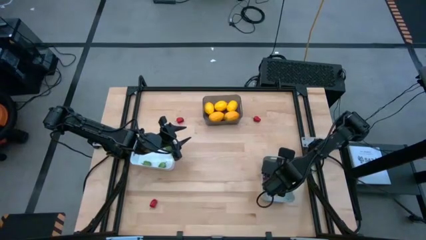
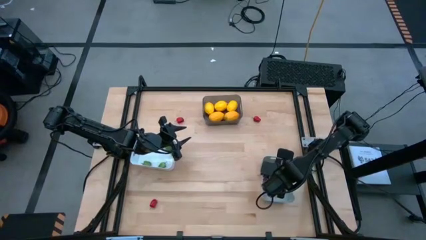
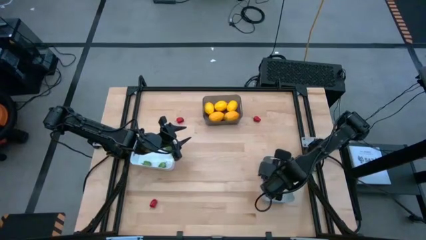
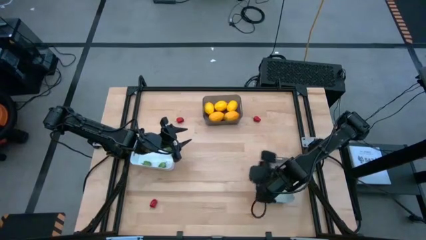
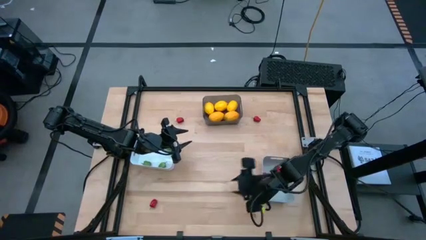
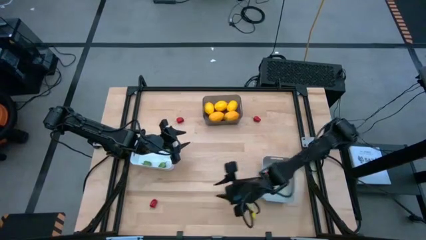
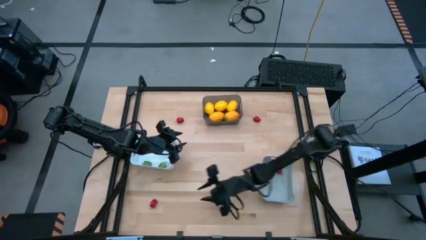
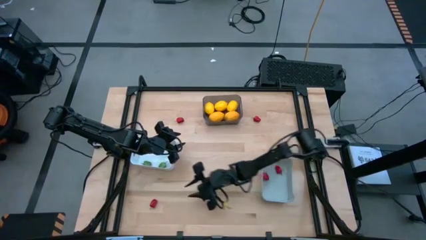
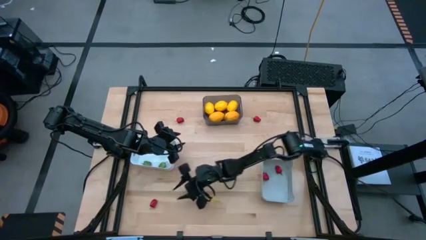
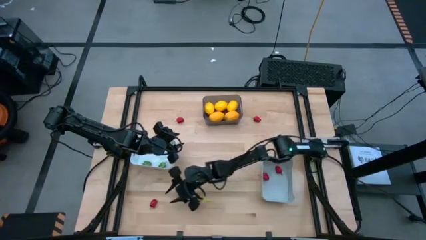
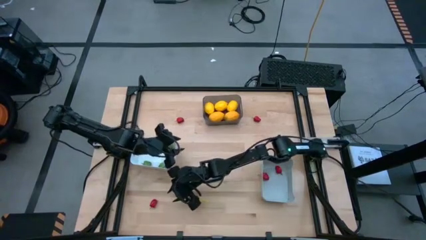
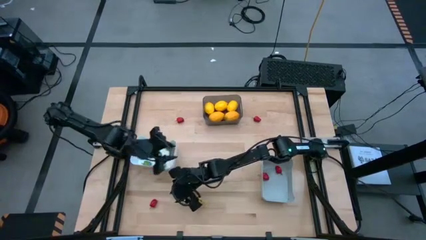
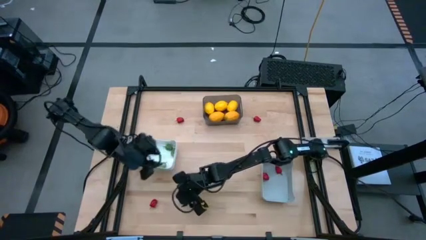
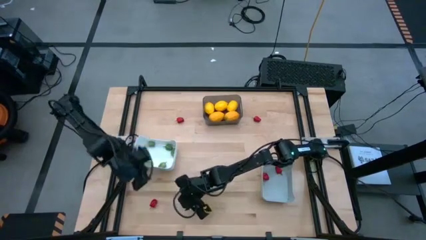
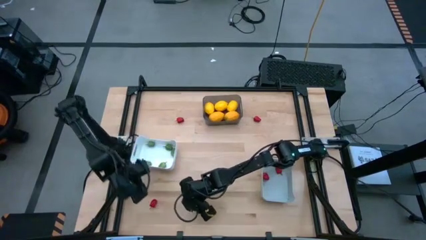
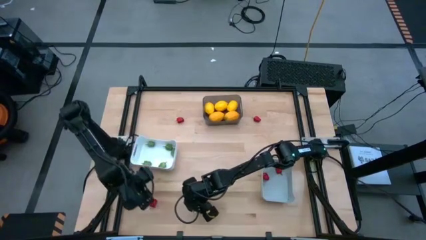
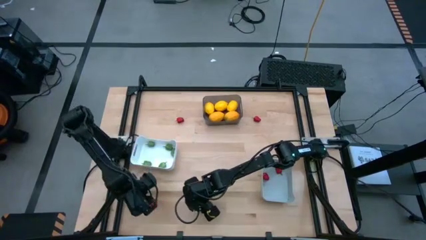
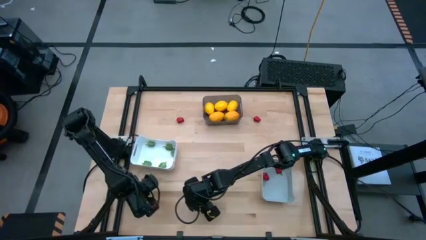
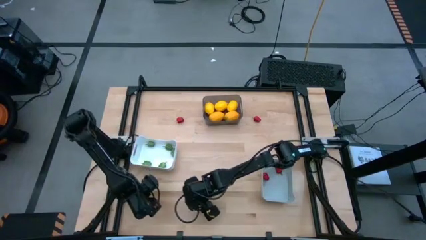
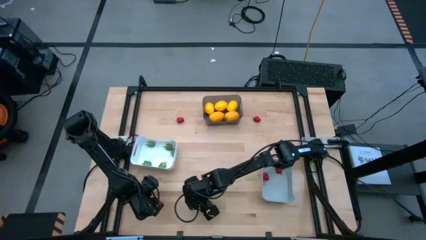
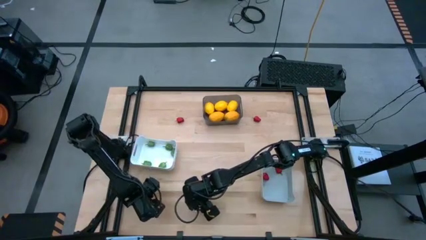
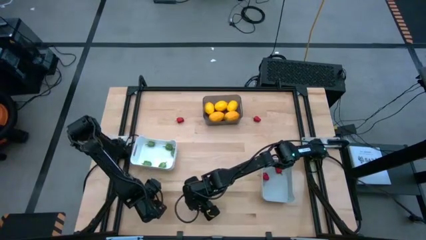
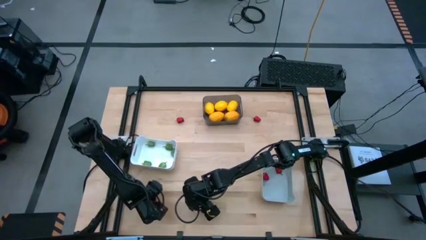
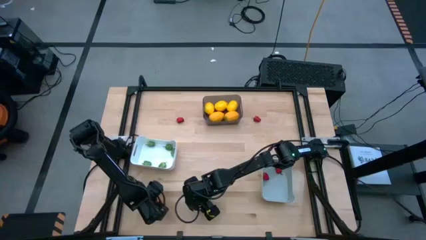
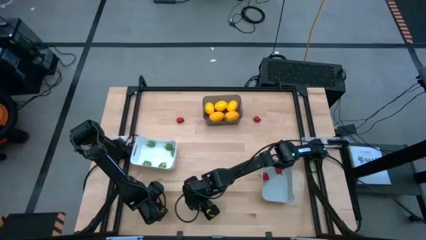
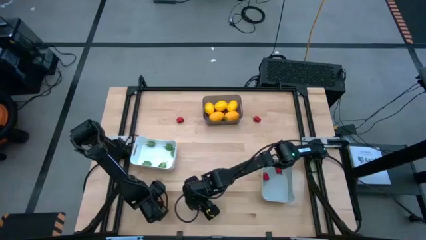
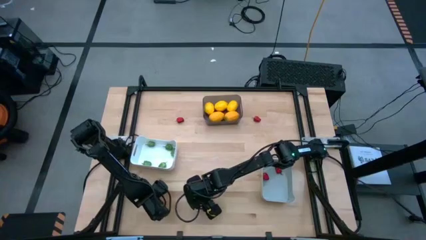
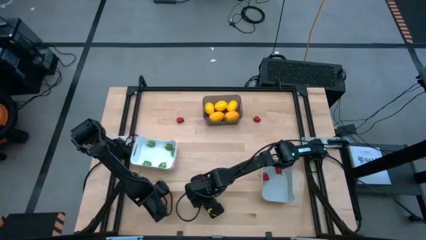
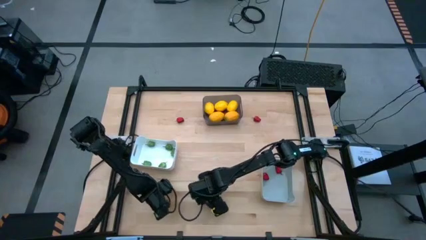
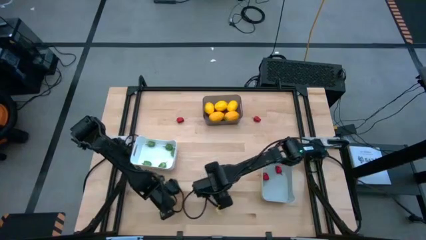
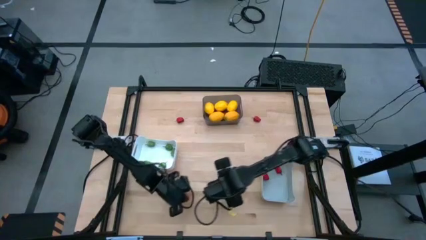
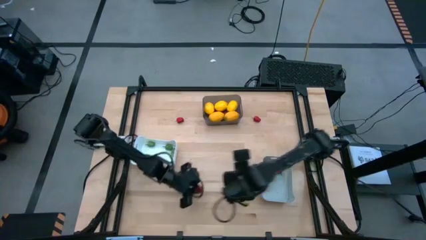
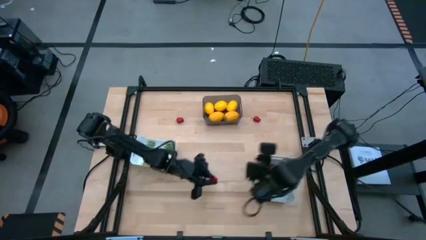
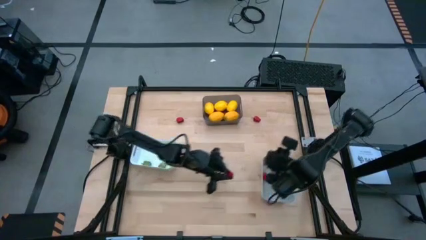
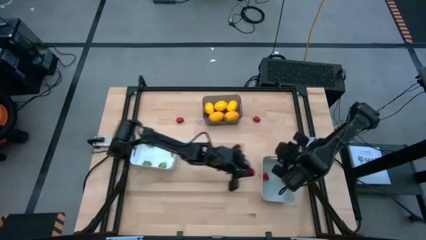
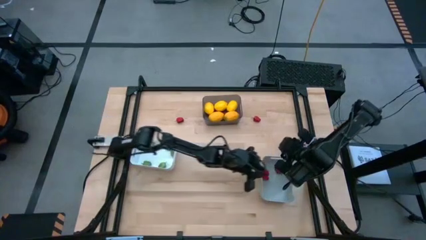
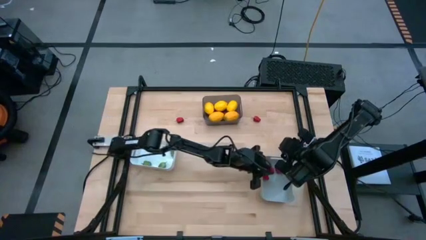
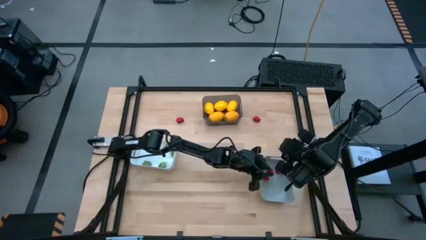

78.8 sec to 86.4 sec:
Task: Sort produce into baskets
Put the red bell pepper into the gray bin

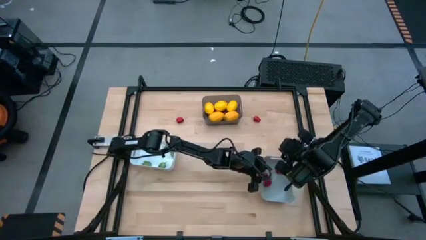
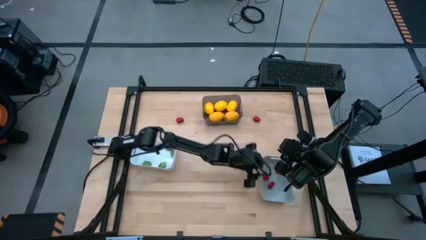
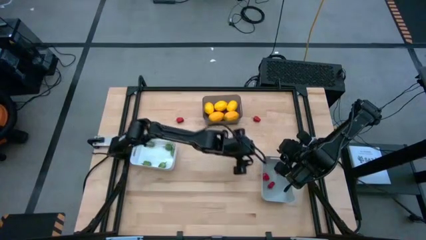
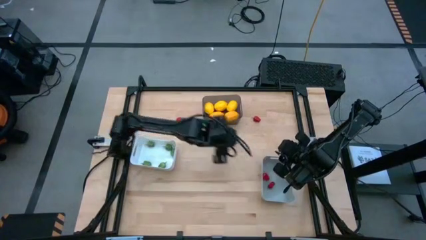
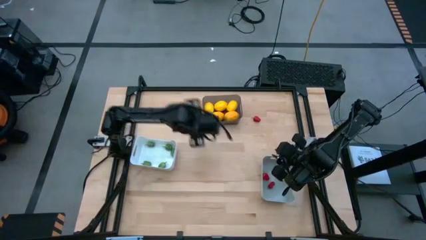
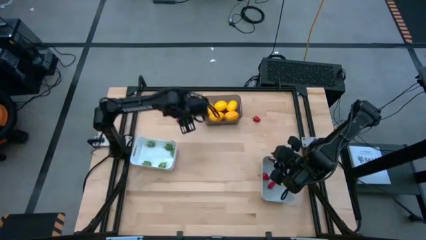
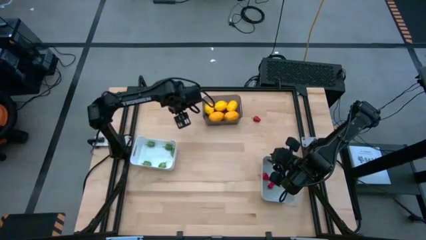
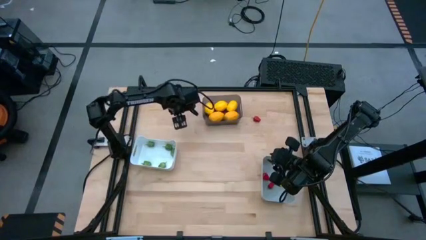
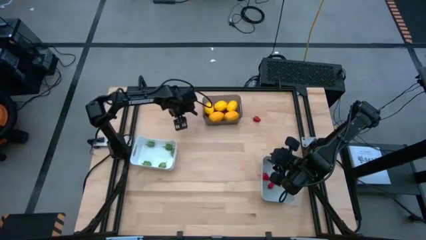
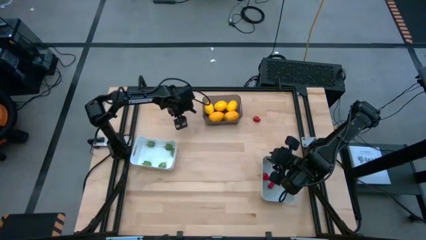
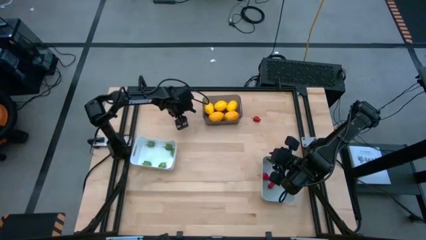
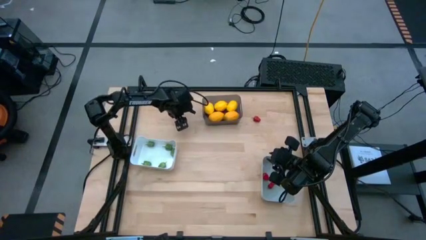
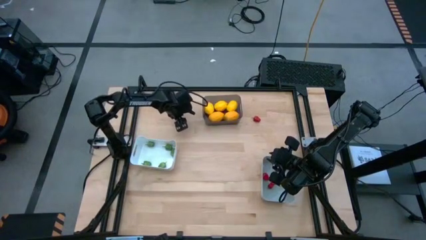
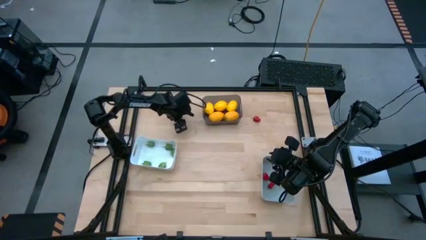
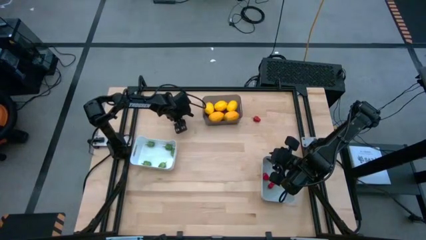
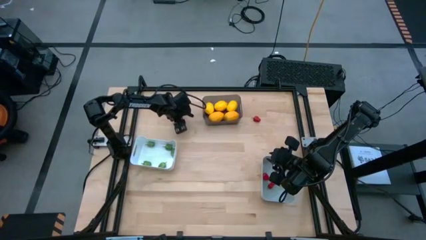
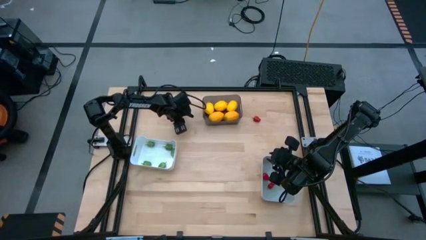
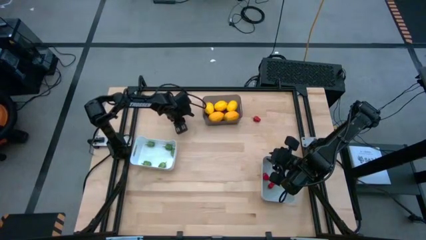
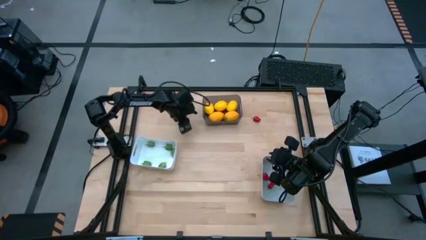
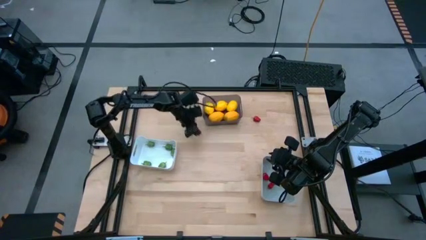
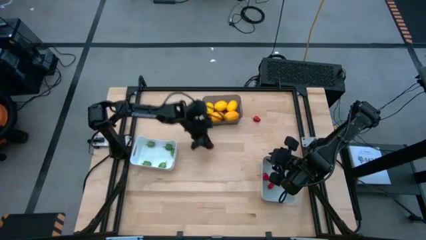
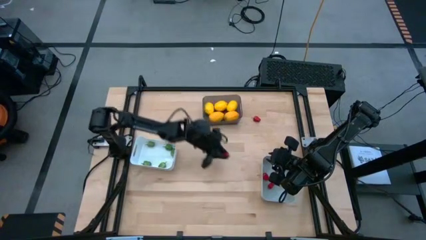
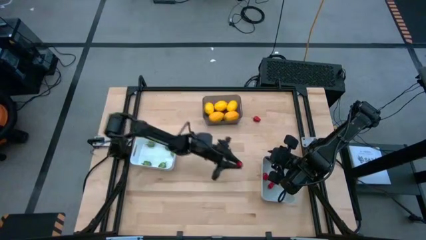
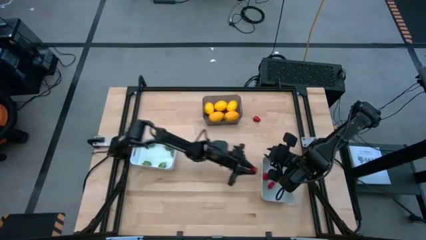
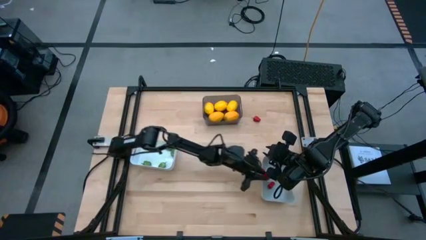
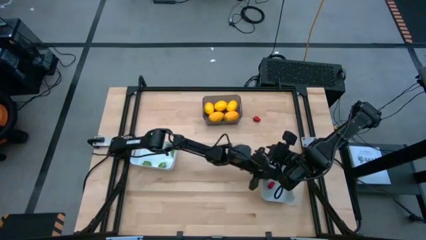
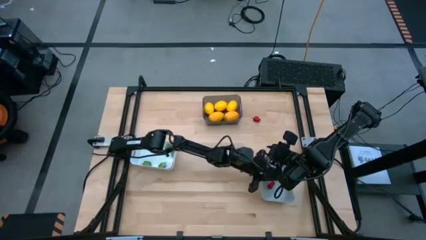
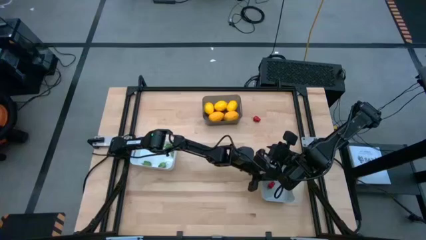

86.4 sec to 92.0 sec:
Put the red bell pepper into the gray bin

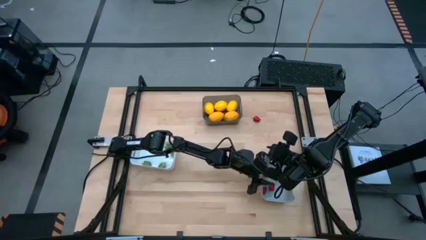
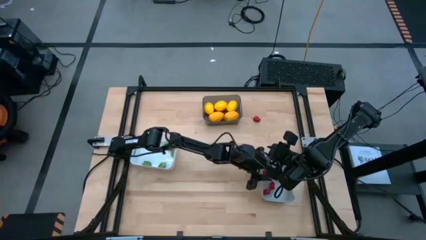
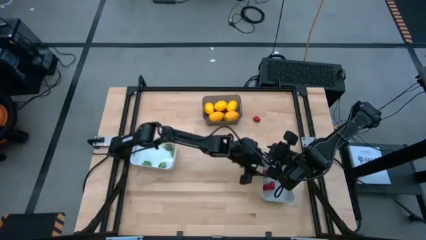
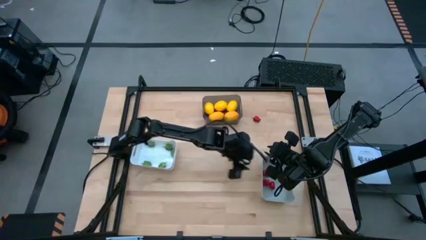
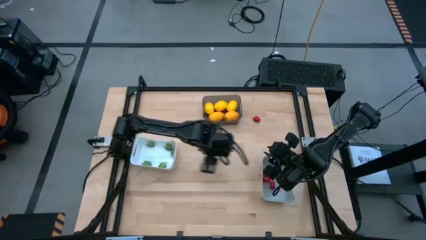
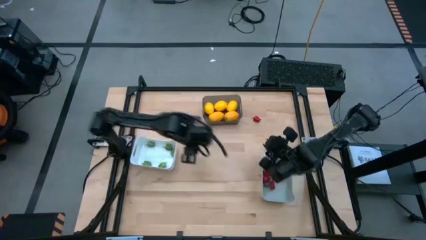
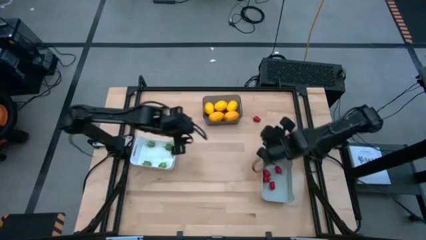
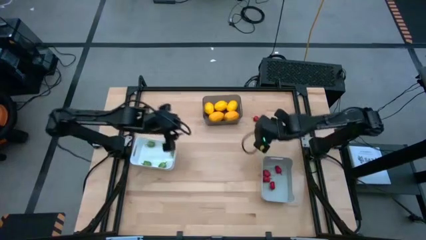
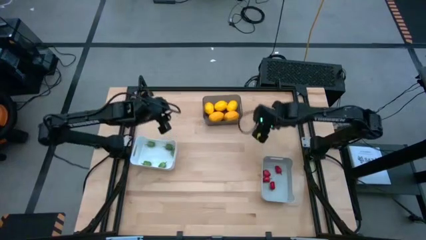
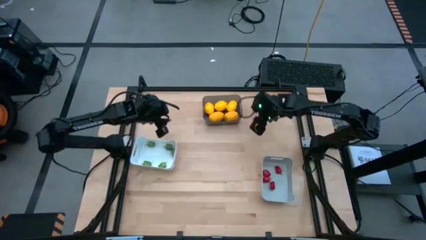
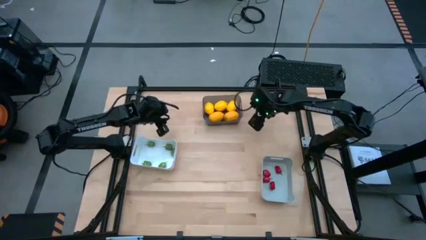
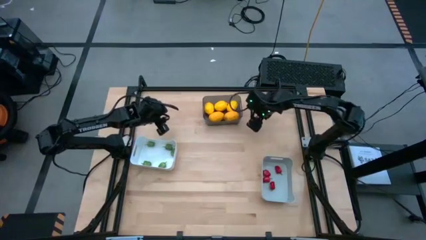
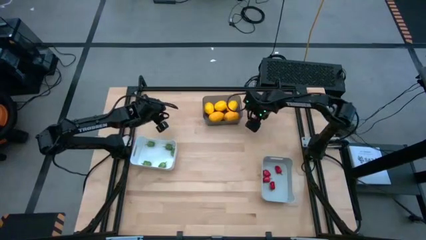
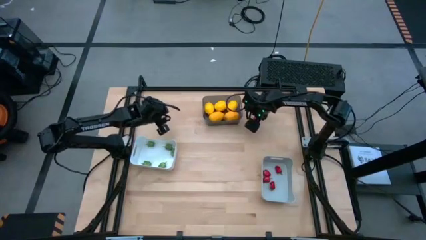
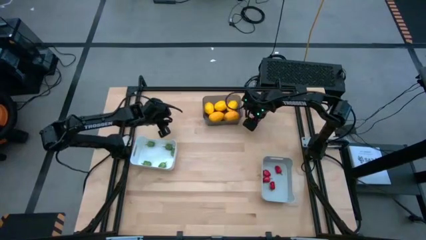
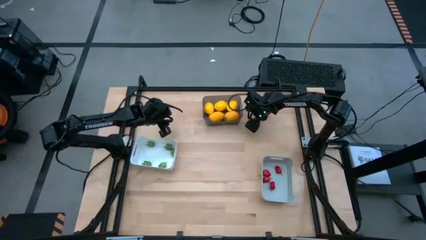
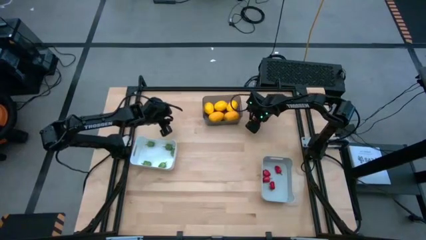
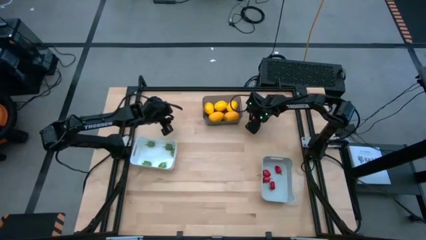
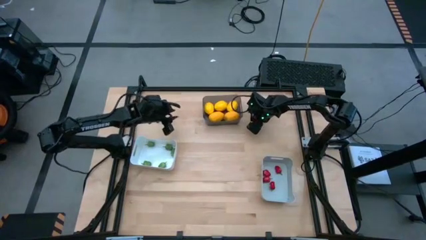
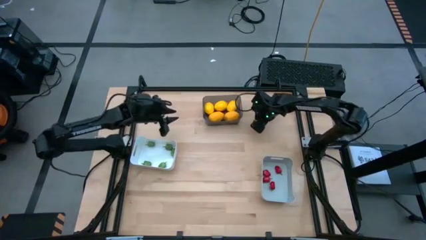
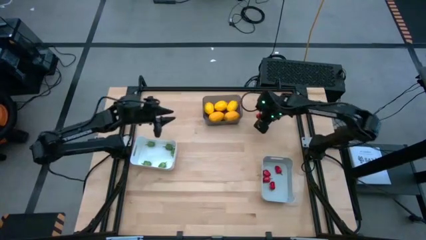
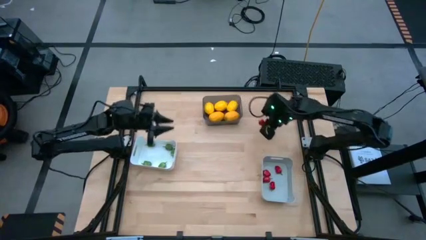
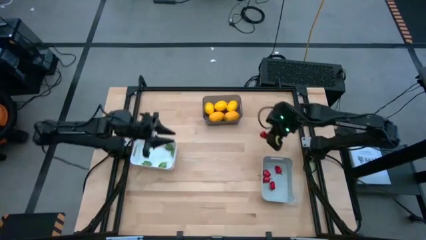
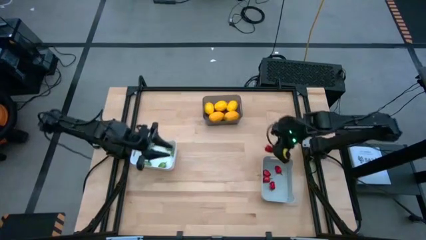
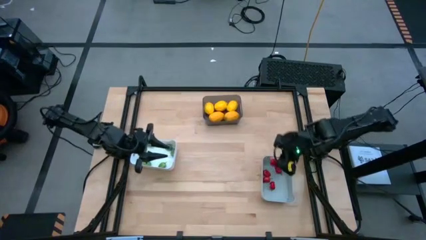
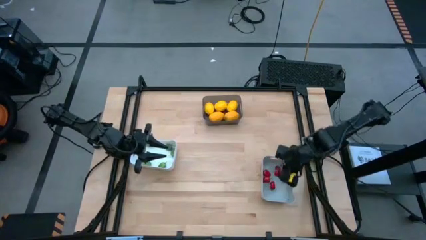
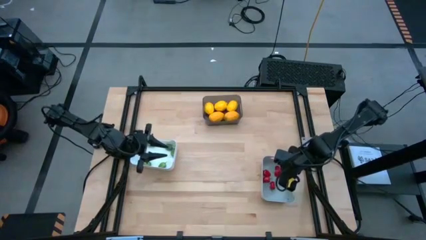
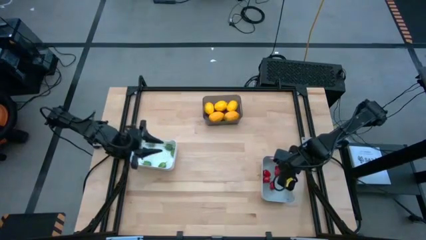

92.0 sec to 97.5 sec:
Put the red bell pepper into the gray bin
